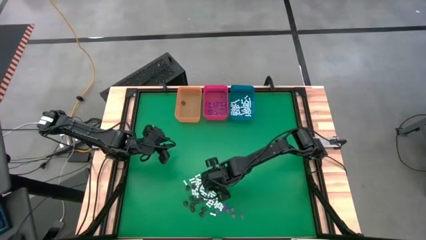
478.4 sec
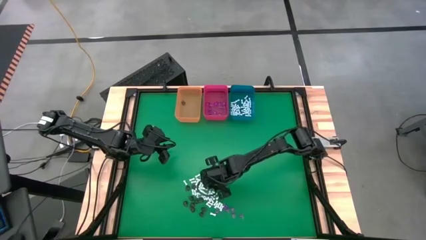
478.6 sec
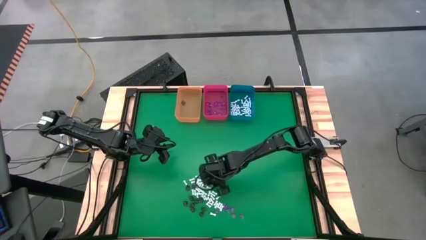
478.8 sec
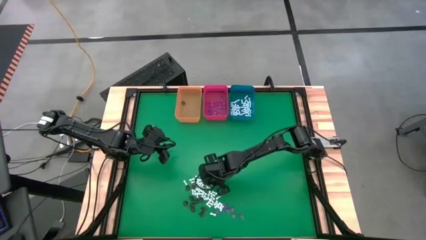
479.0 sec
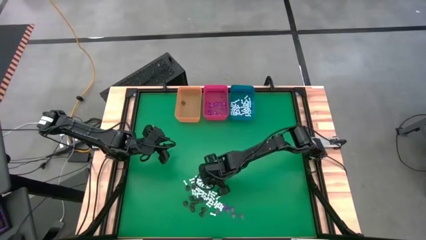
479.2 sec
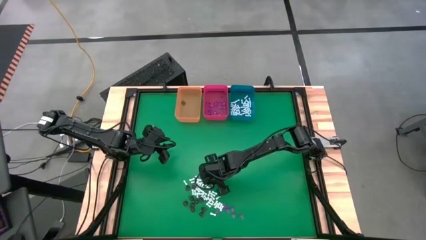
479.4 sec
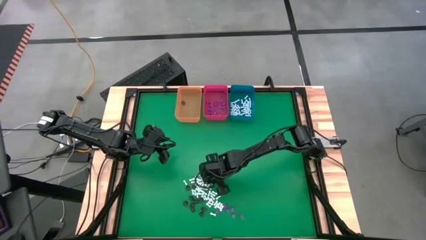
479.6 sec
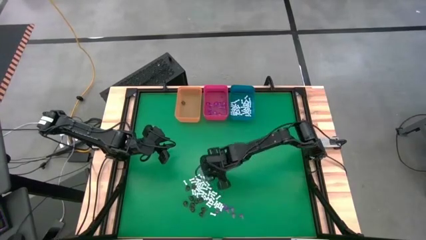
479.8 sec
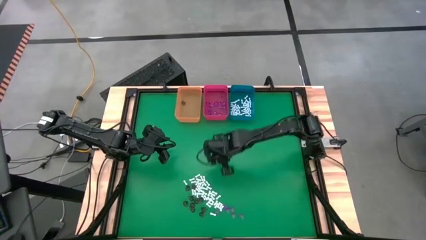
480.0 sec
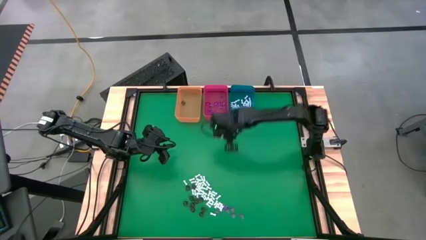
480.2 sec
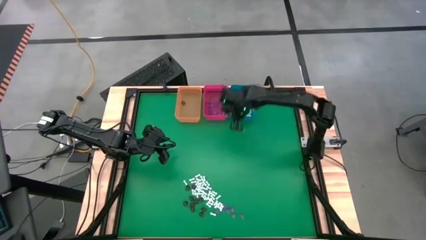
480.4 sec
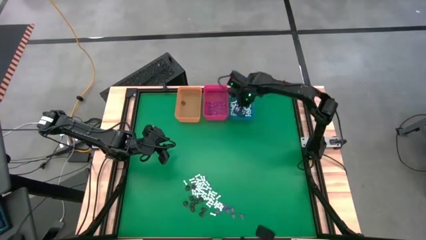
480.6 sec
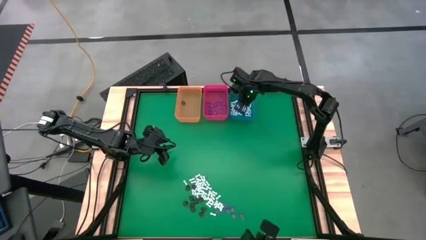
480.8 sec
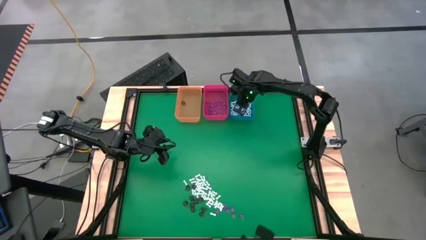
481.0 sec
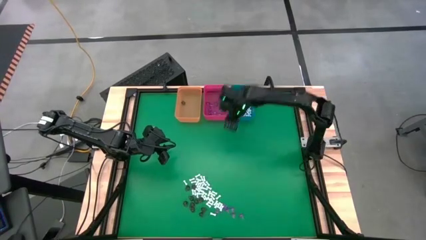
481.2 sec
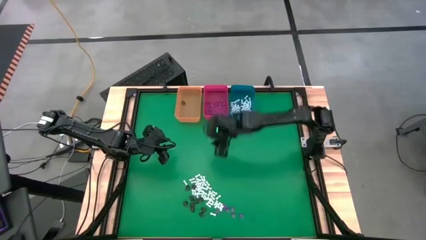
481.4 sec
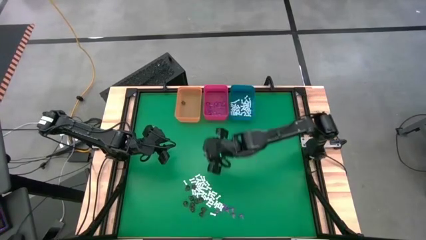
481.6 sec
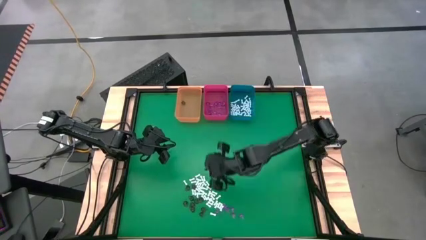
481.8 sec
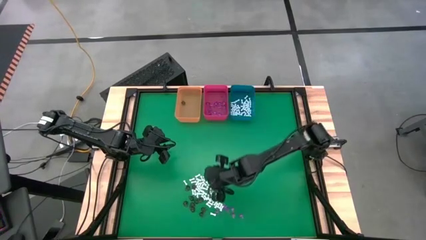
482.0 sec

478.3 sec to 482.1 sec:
Task: Sort Halloween decoration
Put the white bone toy into the blue bin

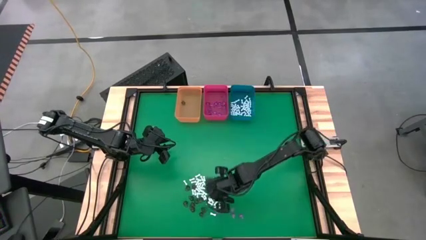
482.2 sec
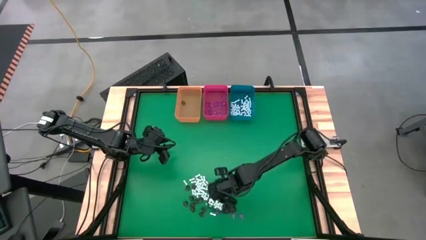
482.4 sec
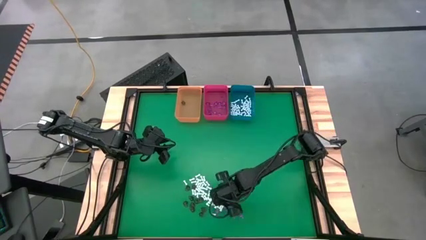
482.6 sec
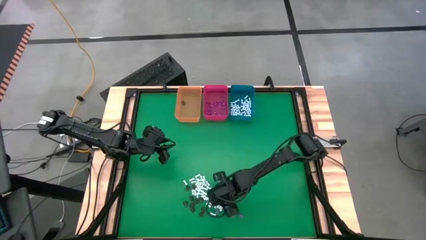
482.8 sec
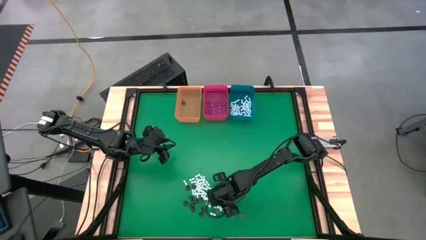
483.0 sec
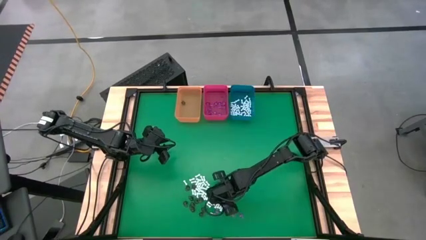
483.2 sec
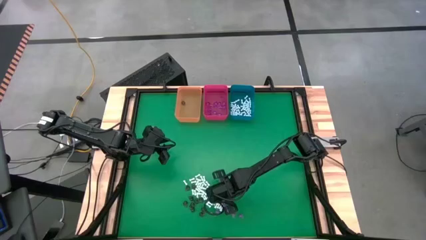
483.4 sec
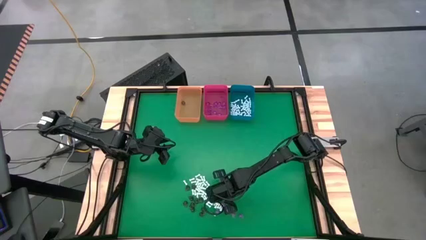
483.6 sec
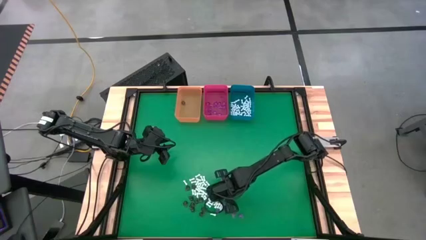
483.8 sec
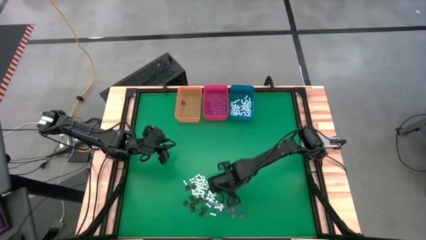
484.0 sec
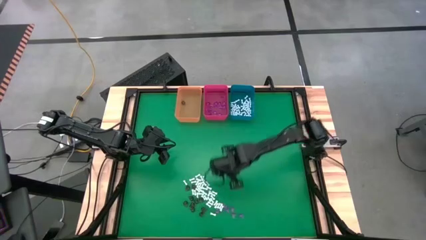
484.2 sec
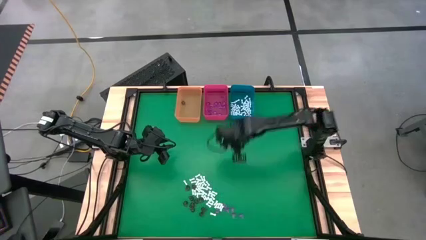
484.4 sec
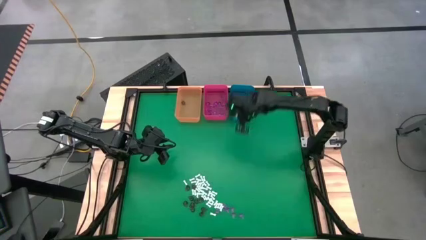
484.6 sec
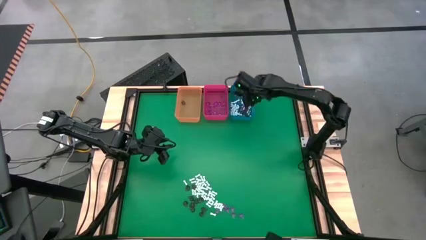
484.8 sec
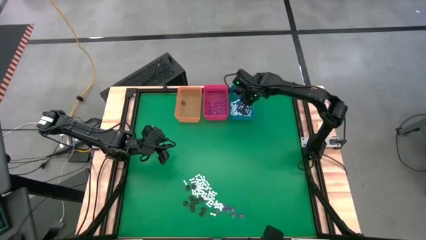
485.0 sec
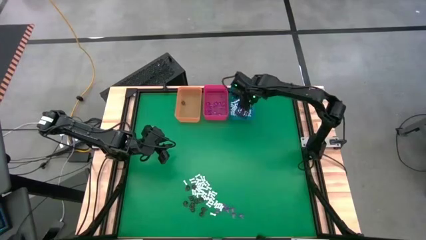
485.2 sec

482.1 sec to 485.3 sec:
Put the white bone toy into the blue bin

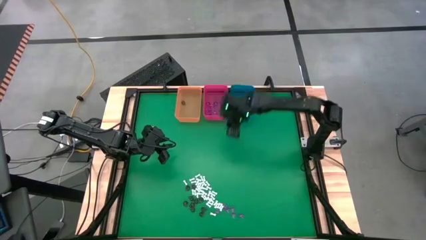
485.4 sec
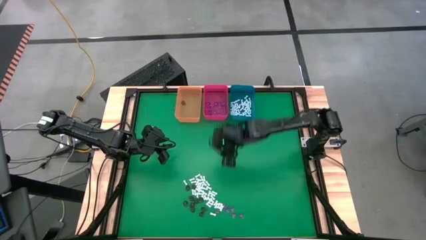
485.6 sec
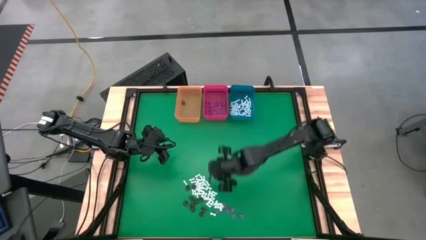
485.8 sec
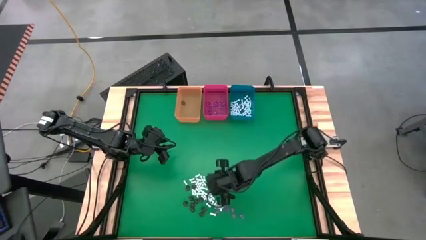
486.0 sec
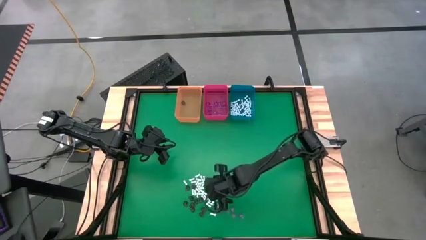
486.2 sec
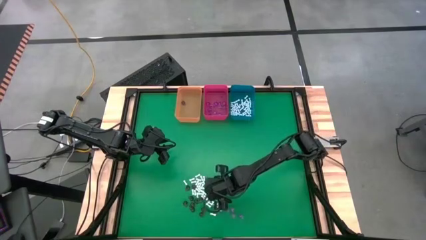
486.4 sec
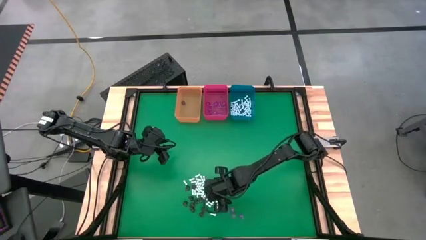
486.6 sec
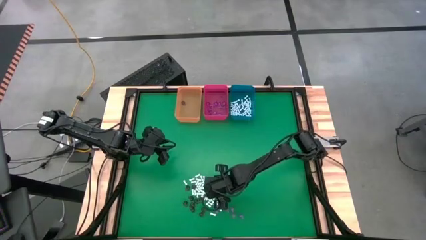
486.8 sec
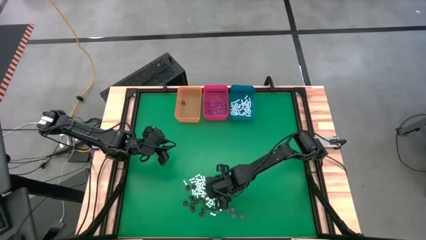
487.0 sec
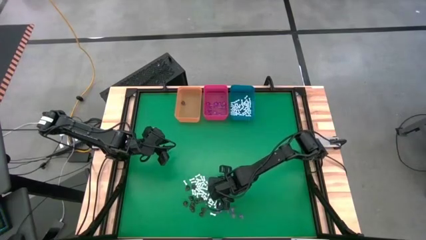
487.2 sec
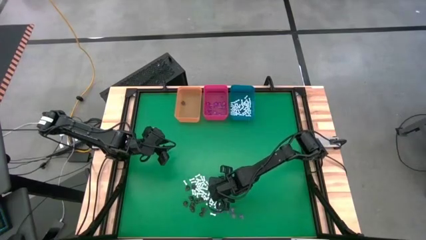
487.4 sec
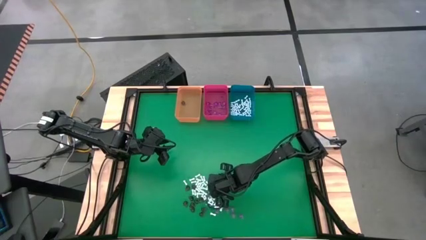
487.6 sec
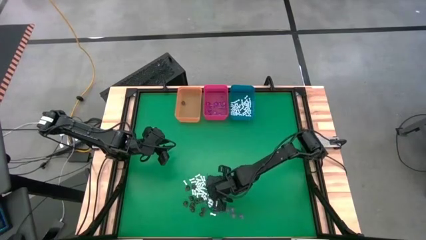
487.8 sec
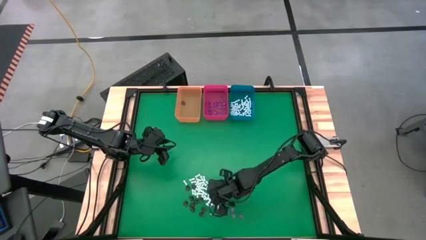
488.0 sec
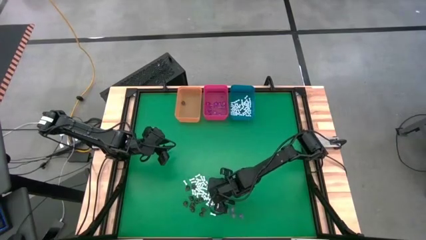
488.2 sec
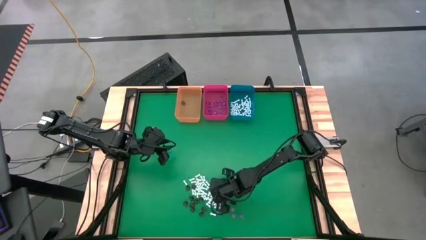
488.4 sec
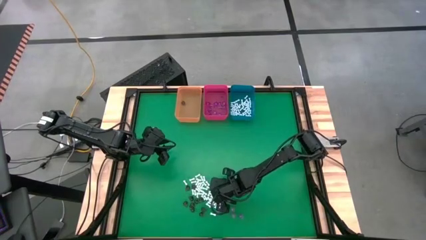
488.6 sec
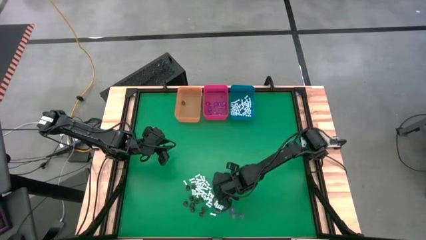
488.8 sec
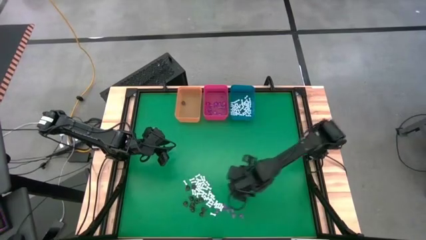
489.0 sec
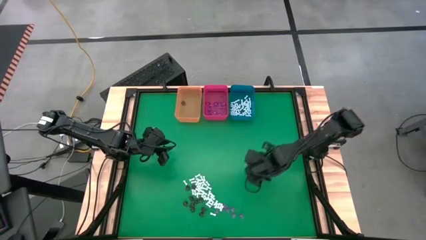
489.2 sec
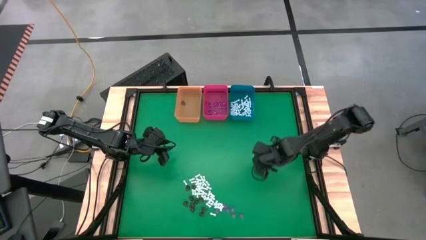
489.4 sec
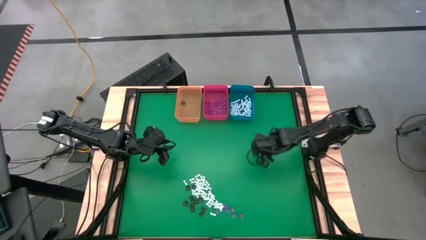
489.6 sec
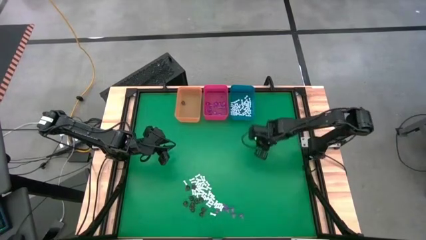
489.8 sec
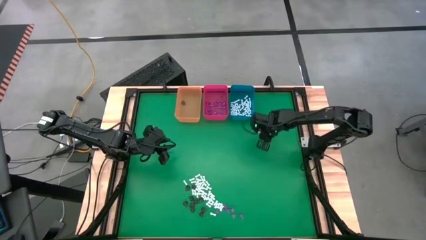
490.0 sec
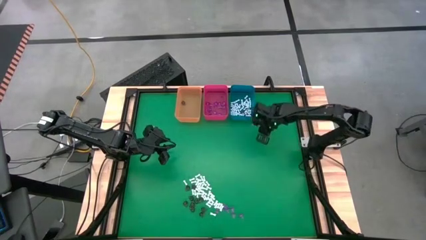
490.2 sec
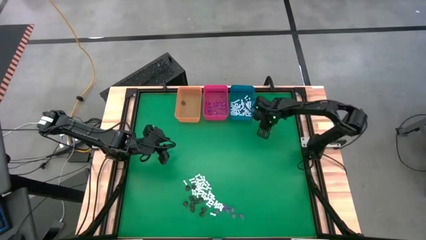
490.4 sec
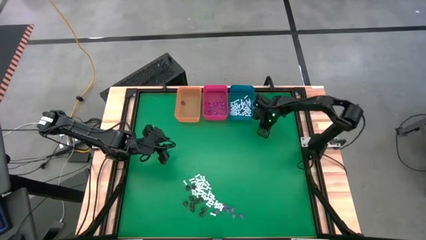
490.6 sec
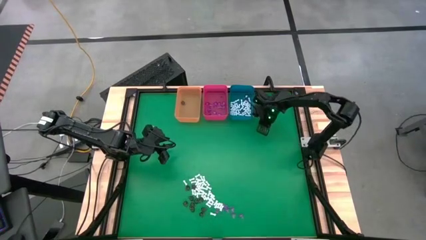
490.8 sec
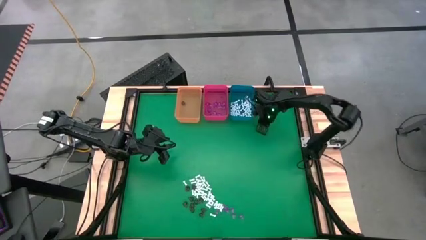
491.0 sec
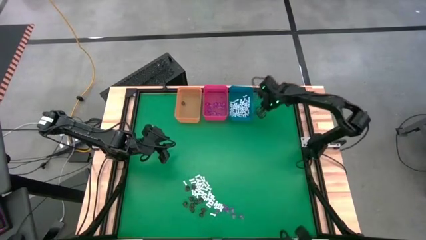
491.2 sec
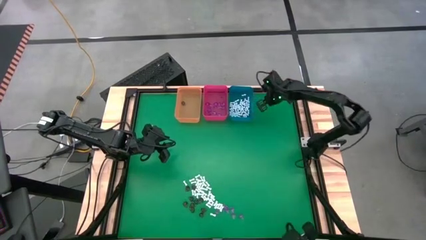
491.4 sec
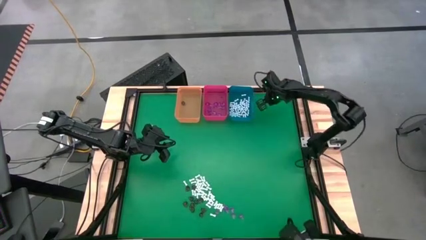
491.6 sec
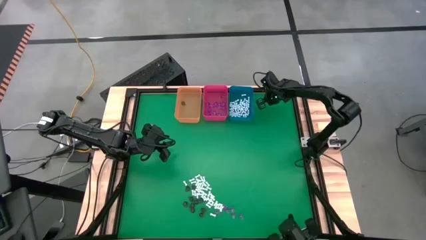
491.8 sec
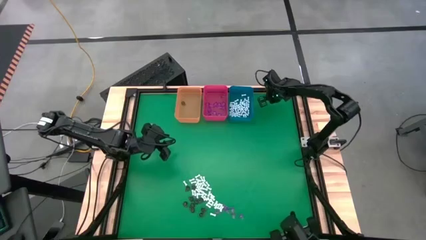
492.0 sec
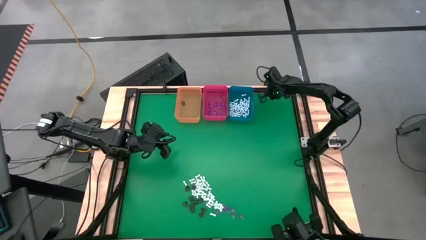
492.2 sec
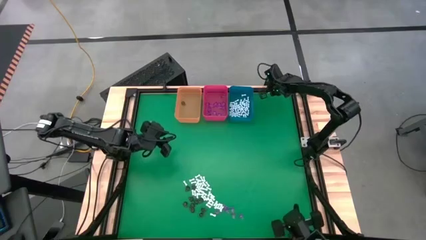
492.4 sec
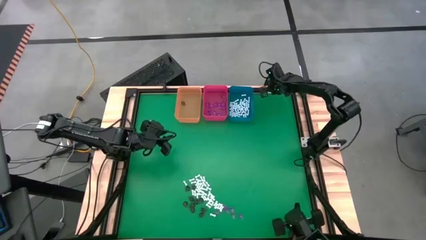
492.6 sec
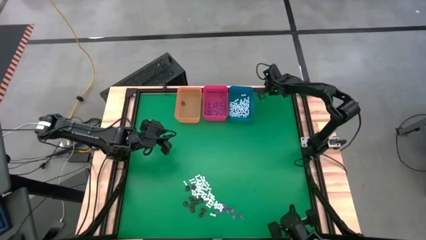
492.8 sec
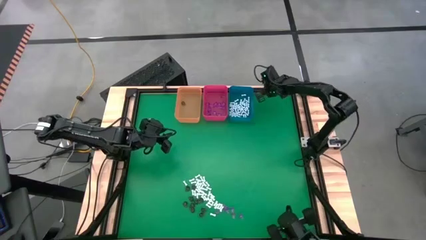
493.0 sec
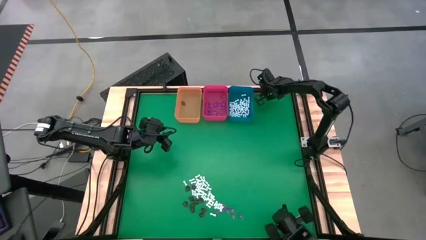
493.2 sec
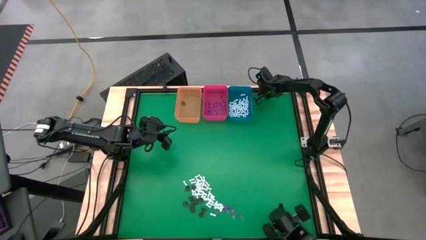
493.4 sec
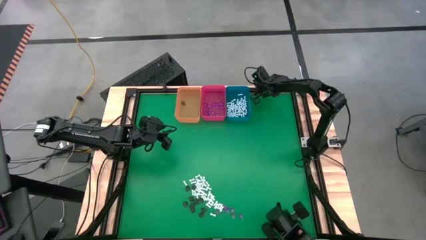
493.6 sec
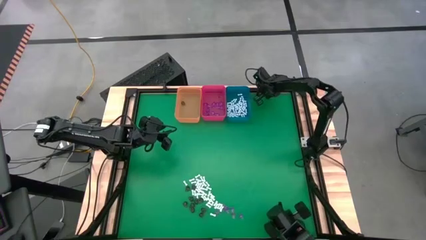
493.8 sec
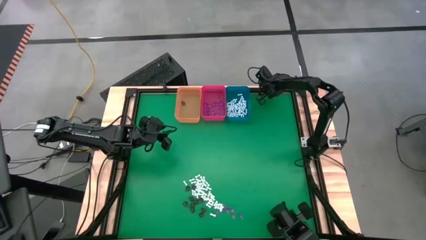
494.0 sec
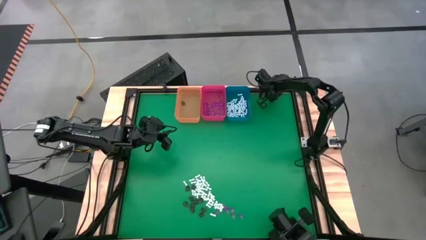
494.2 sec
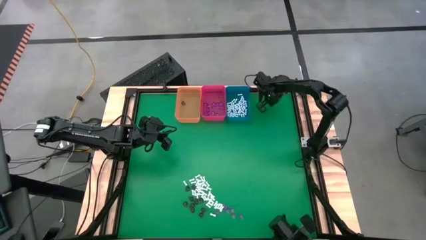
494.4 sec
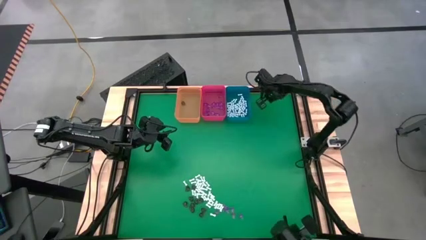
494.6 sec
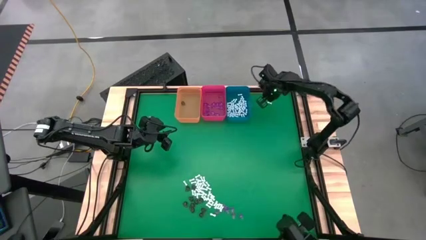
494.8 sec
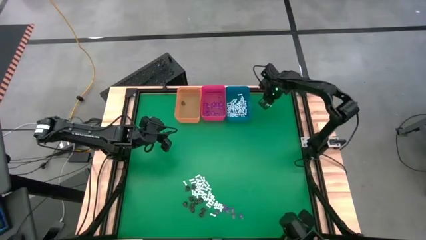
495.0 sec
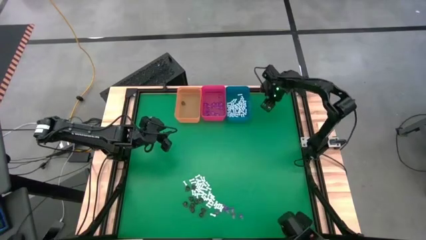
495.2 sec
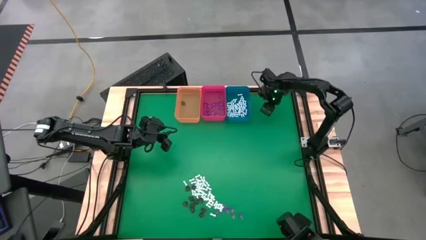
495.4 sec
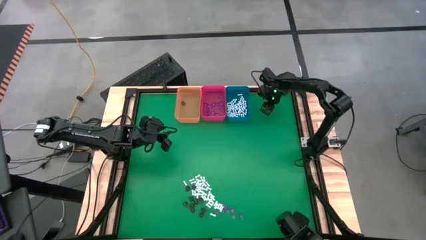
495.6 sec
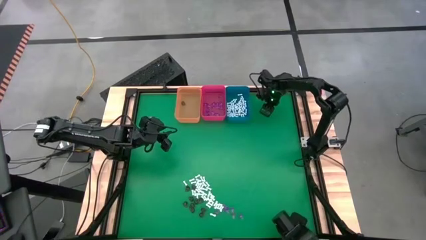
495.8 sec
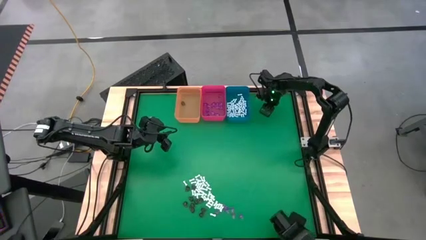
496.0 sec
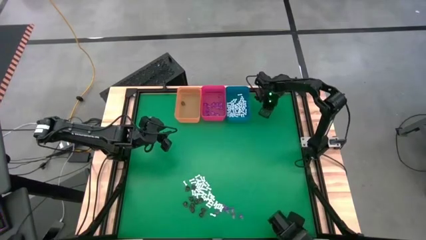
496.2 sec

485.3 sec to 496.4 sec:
Put the white bone toy into the blue bin
